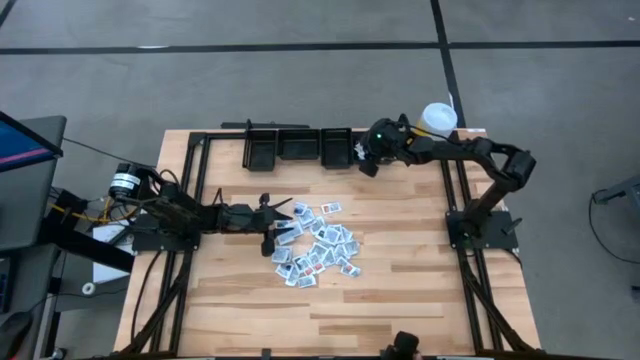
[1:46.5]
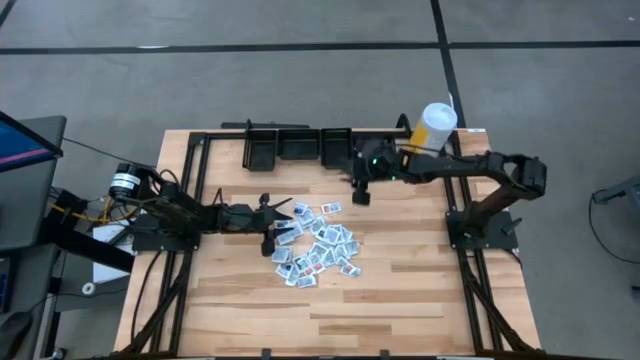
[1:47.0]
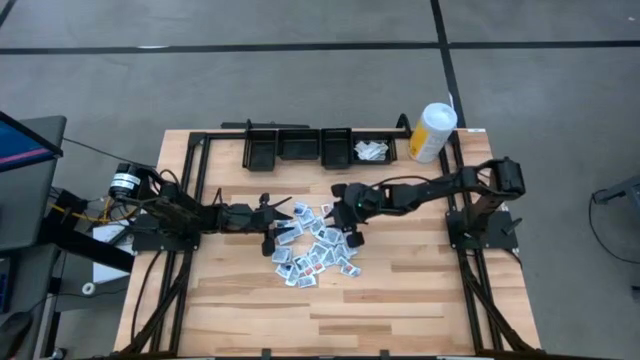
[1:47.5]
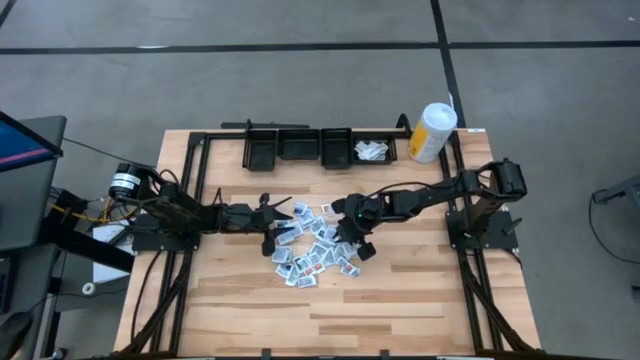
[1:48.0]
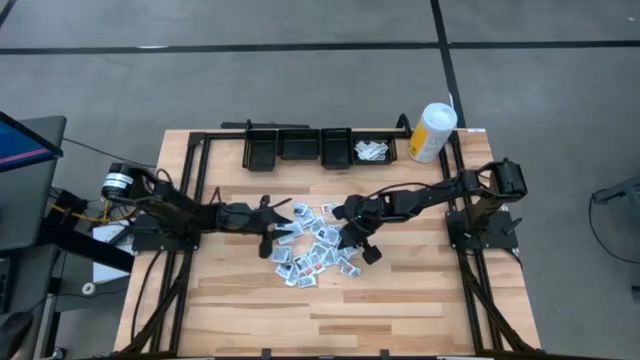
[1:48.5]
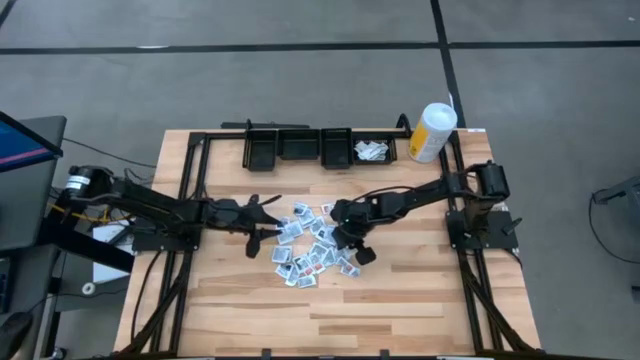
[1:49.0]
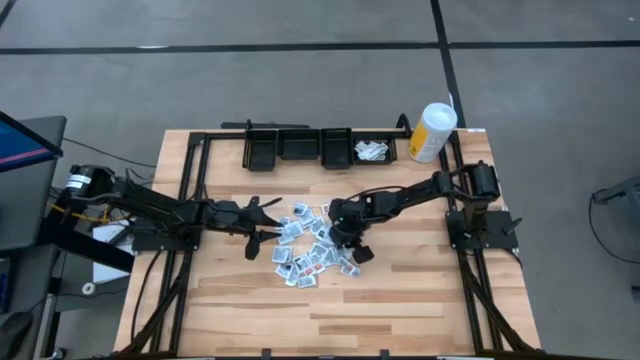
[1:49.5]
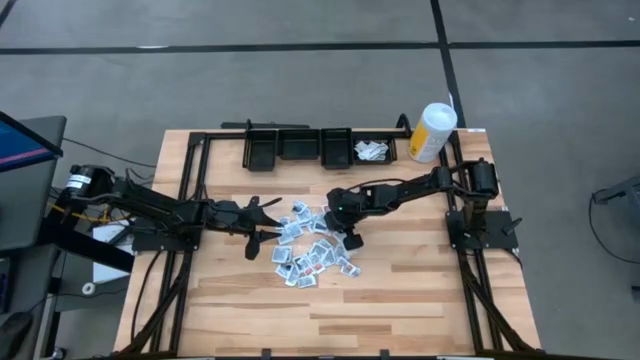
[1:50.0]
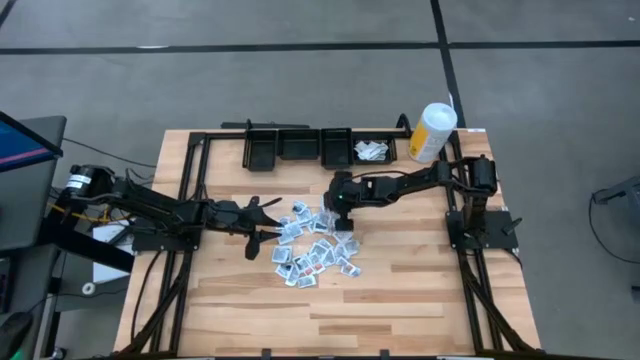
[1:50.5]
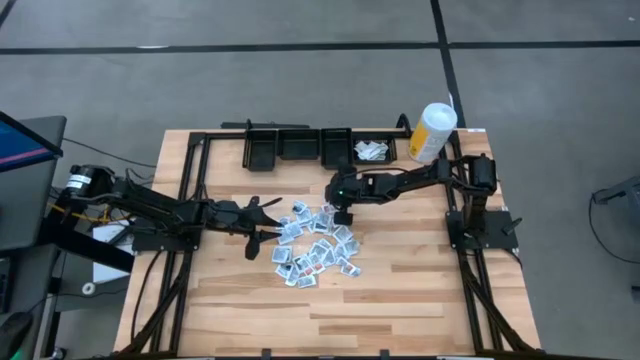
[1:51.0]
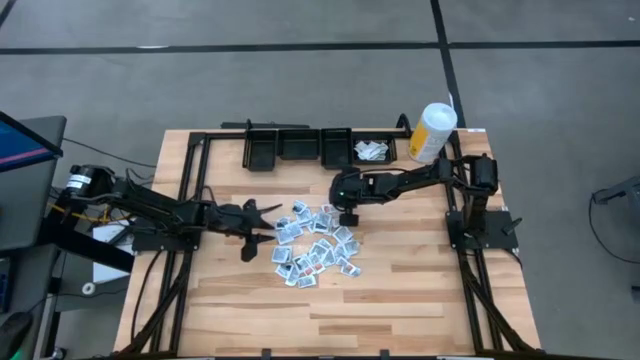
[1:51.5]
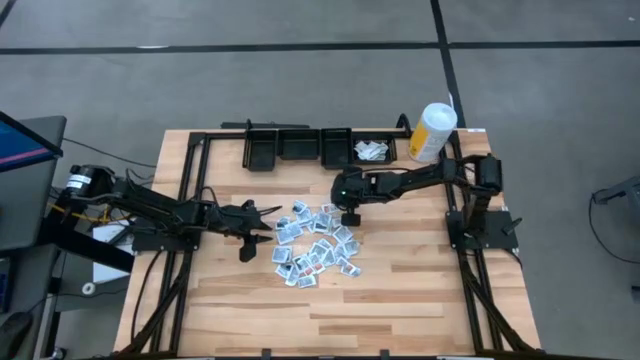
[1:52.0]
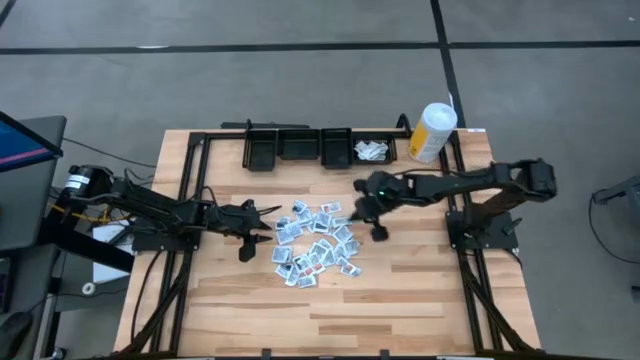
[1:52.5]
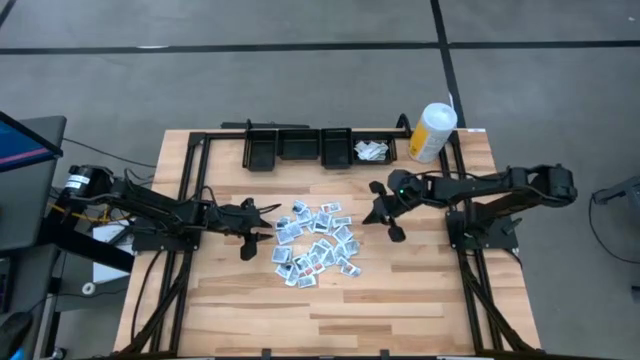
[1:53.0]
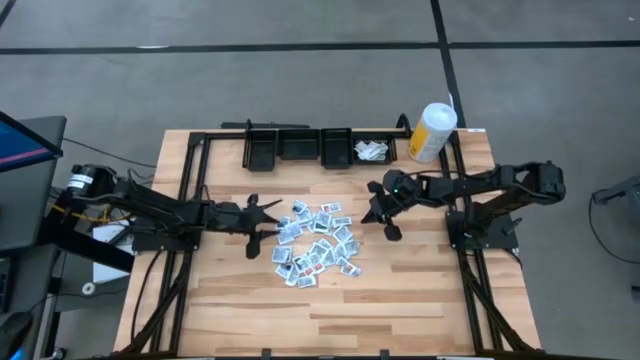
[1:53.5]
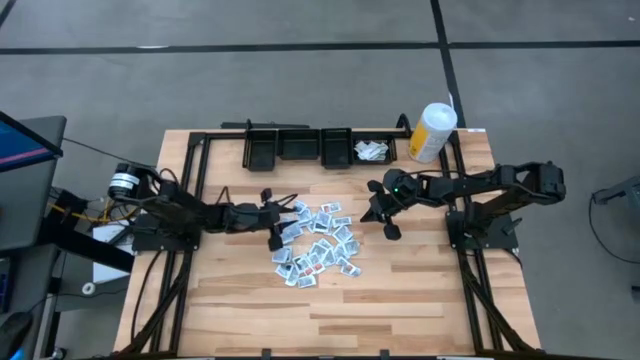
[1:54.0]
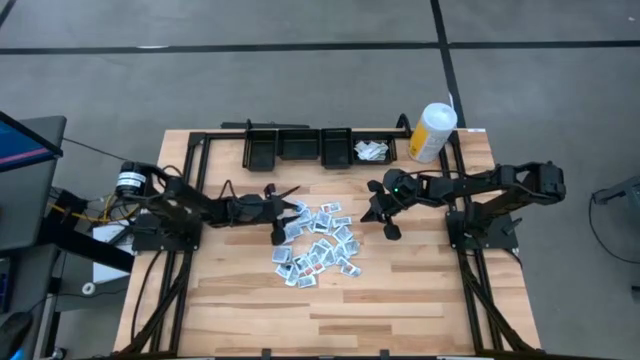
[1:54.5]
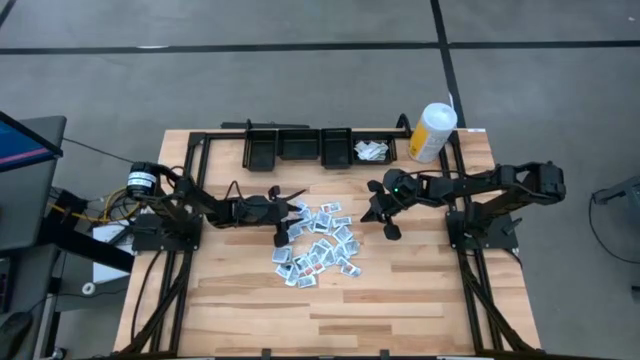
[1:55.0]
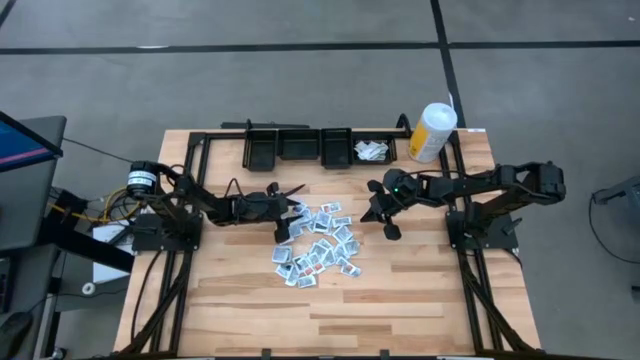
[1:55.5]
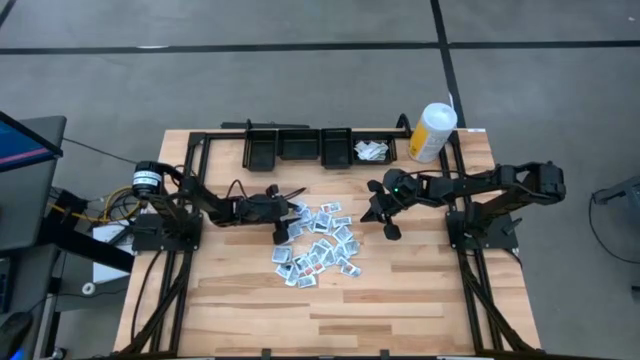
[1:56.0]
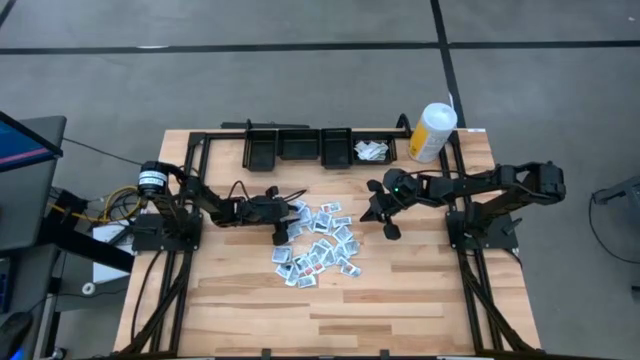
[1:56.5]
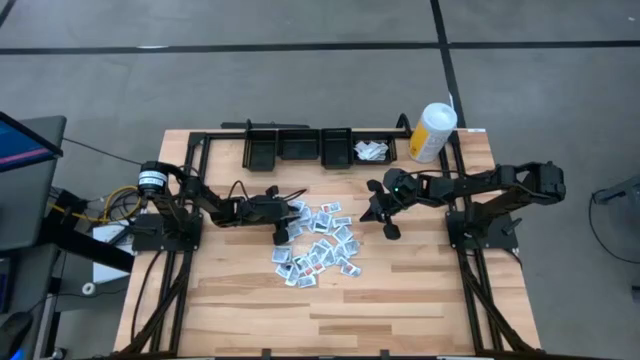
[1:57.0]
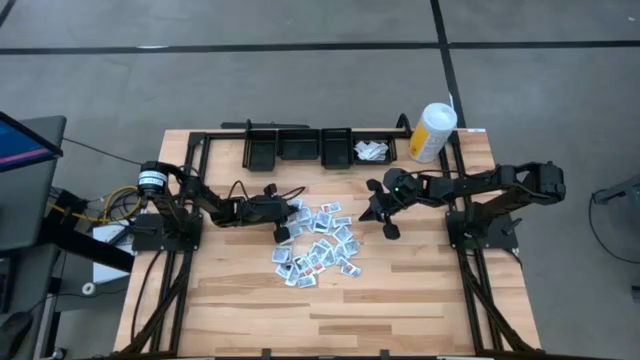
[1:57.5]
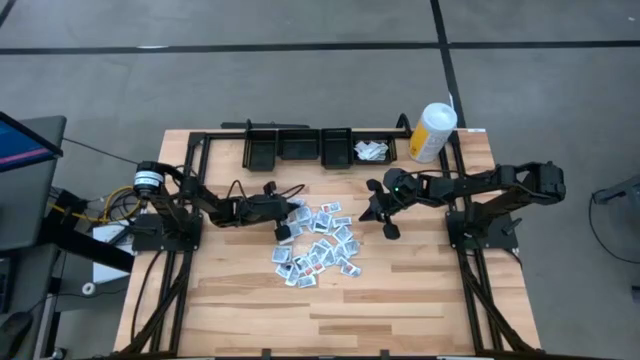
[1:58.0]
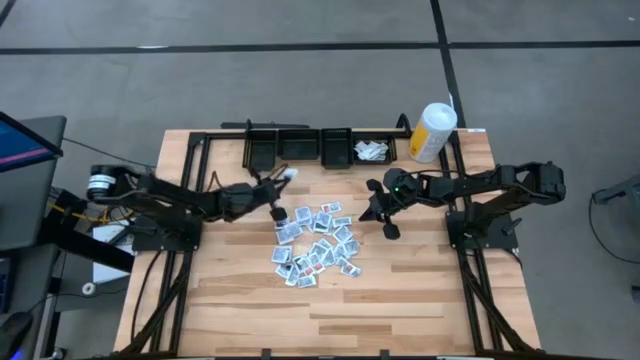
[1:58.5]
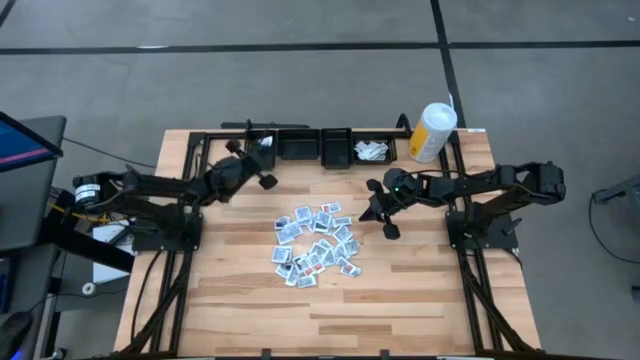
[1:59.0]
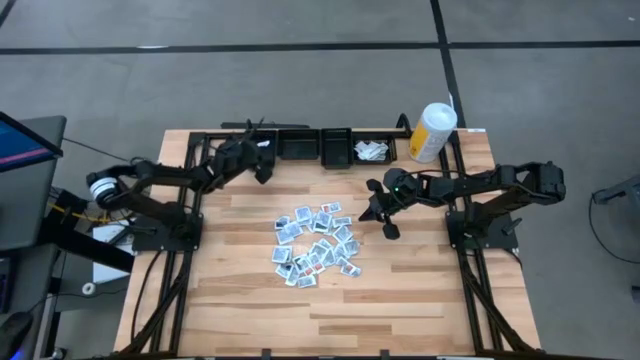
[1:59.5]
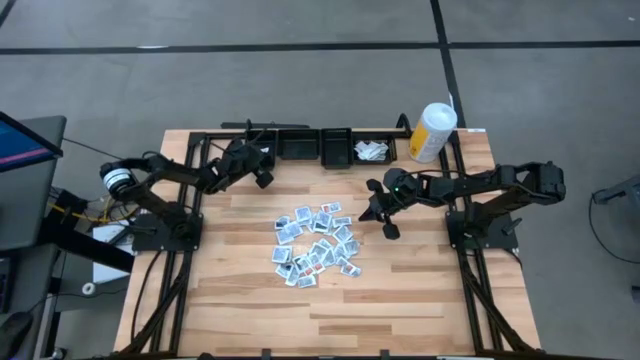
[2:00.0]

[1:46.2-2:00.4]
Task: Pick & Place First Aid Supplies
Put the blue alcohol pad into the left black bin

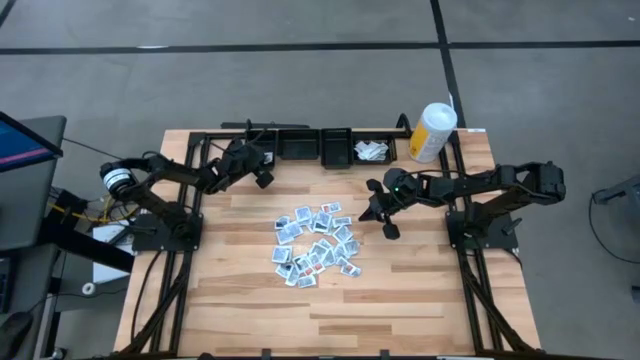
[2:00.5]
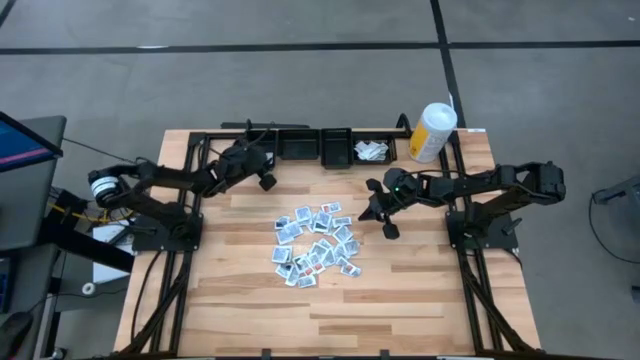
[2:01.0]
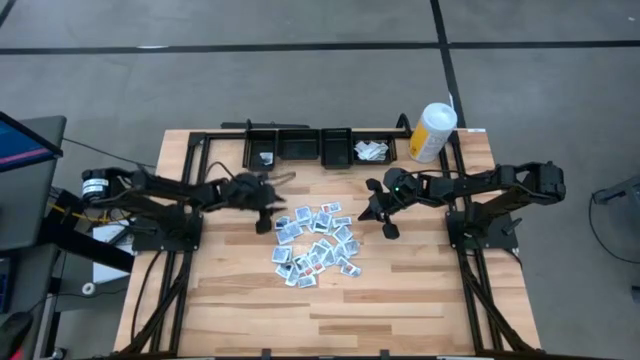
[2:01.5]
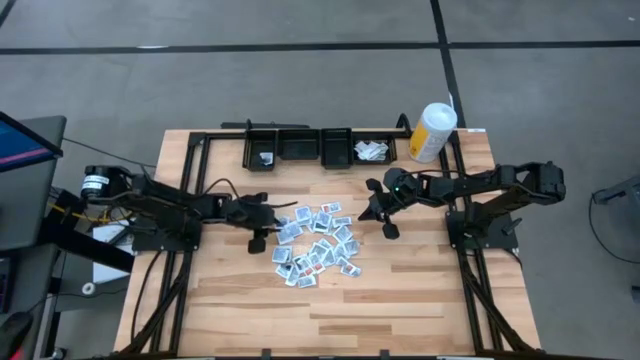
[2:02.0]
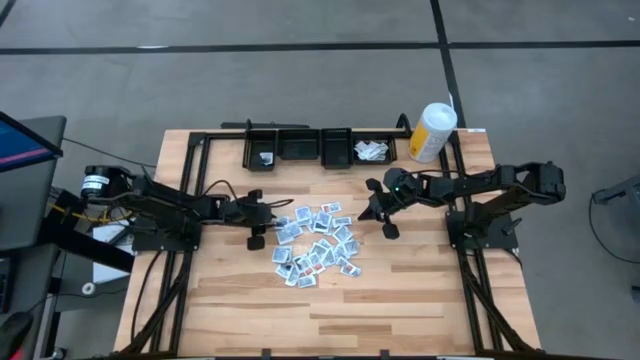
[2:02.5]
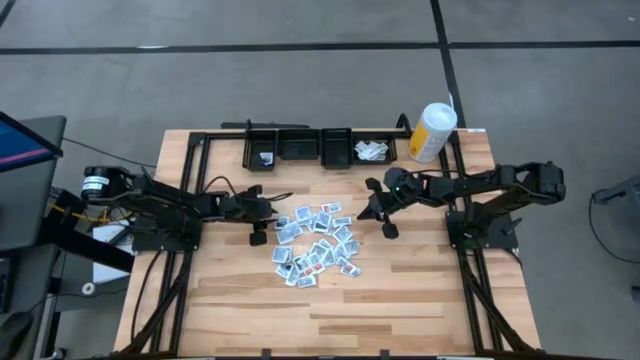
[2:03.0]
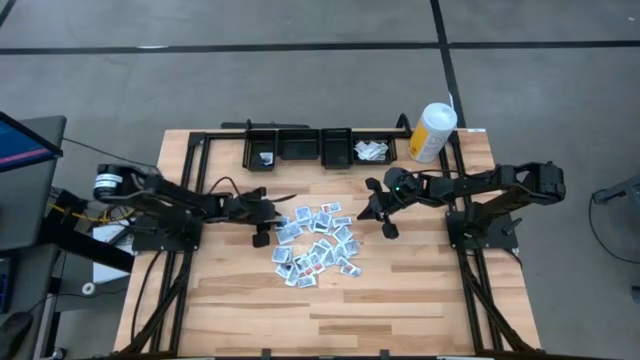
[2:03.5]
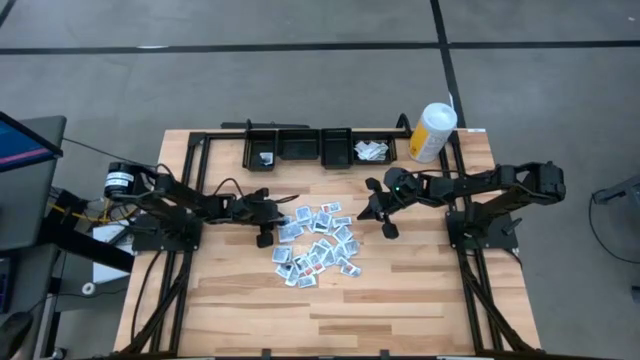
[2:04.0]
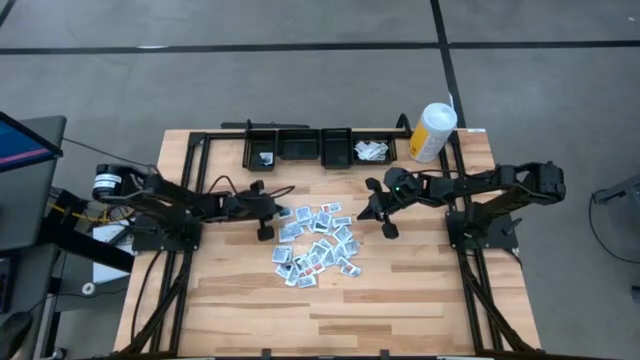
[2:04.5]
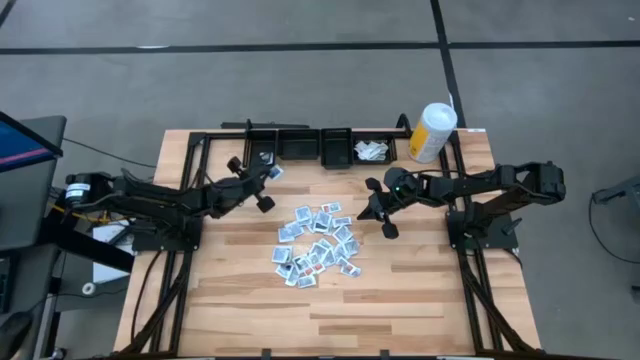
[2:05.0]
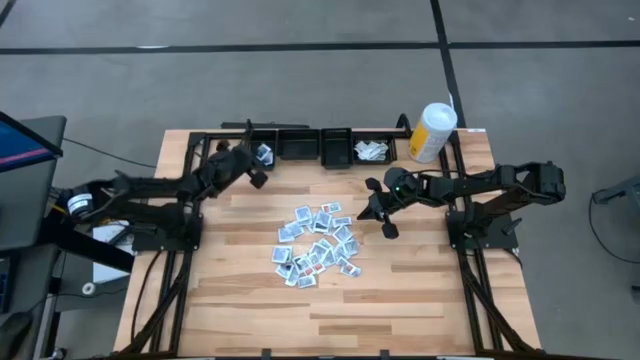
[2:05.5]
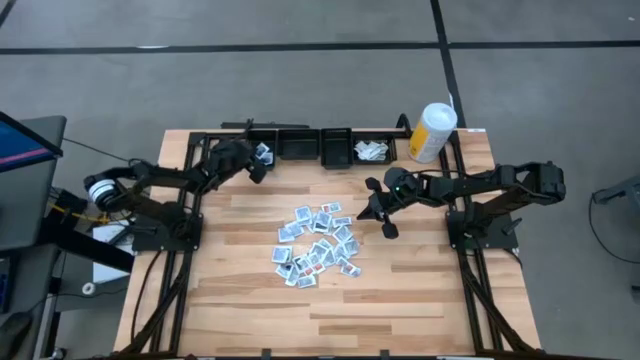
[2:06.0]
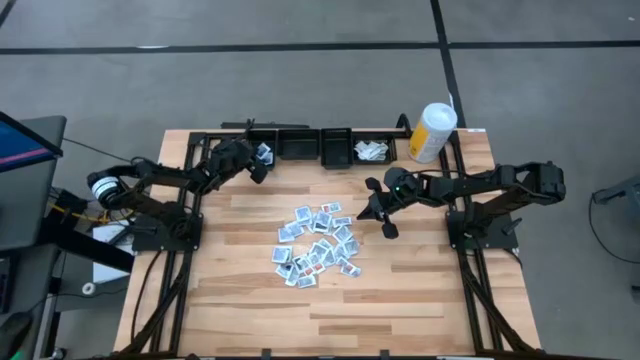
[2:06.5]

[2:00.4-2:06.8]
Put the blue alcohol pad into the left black bin
